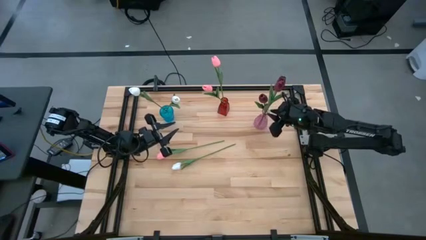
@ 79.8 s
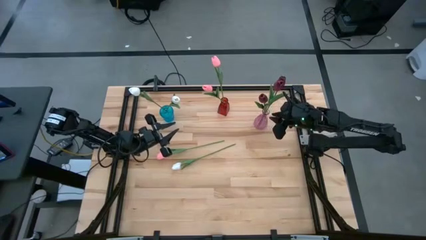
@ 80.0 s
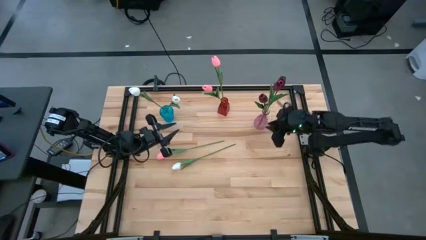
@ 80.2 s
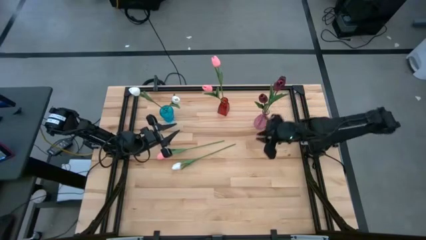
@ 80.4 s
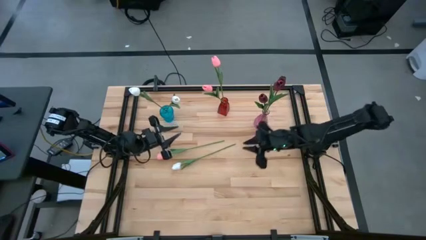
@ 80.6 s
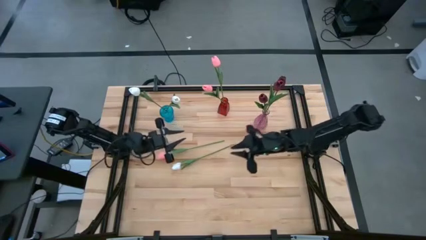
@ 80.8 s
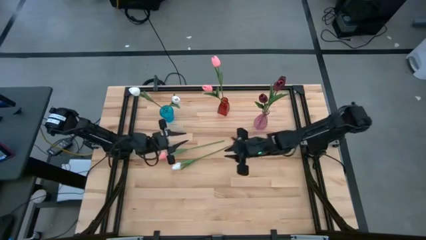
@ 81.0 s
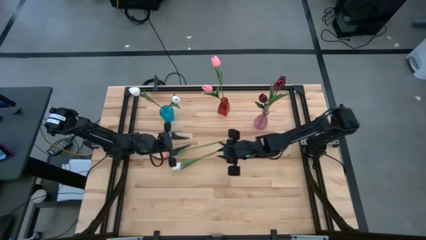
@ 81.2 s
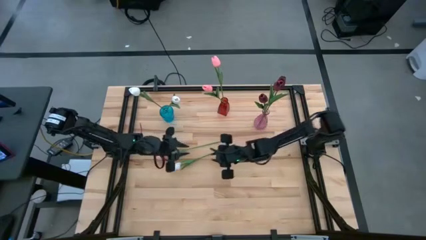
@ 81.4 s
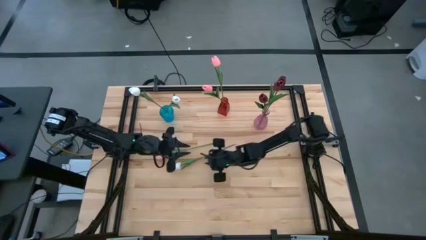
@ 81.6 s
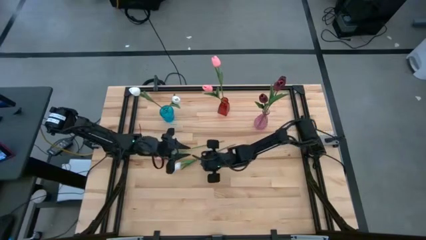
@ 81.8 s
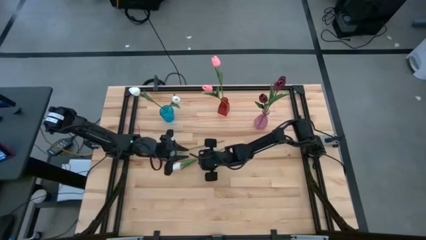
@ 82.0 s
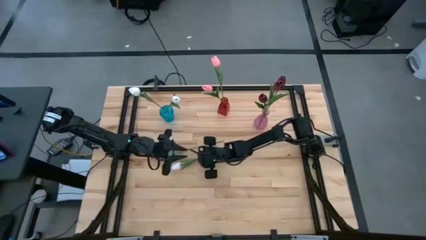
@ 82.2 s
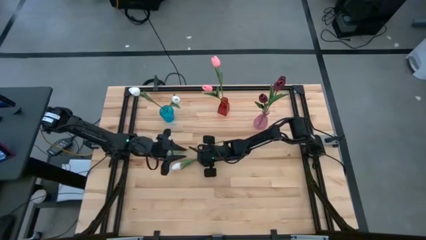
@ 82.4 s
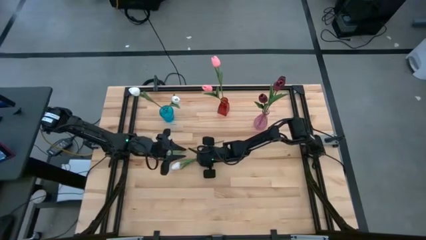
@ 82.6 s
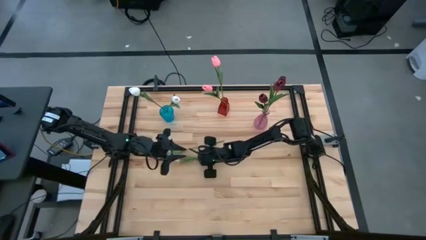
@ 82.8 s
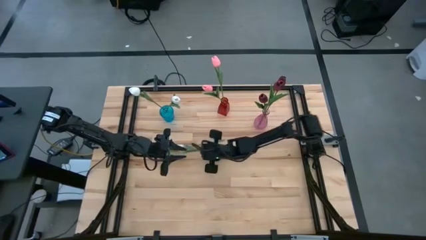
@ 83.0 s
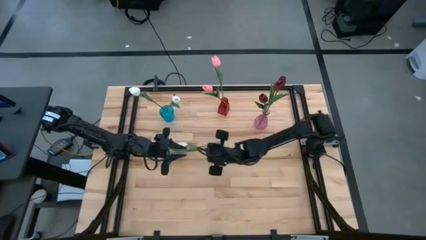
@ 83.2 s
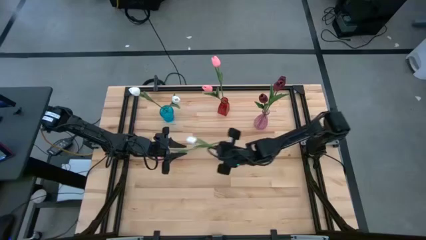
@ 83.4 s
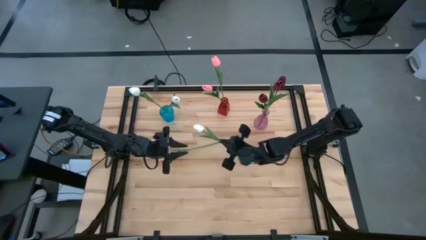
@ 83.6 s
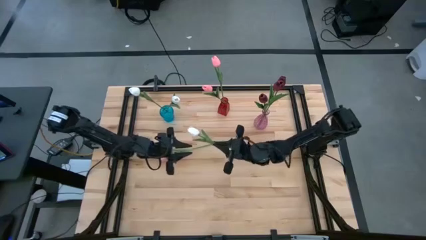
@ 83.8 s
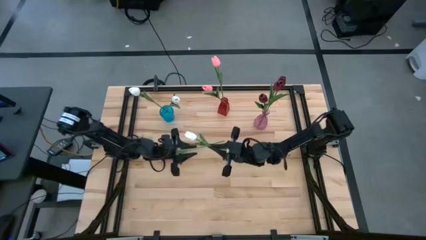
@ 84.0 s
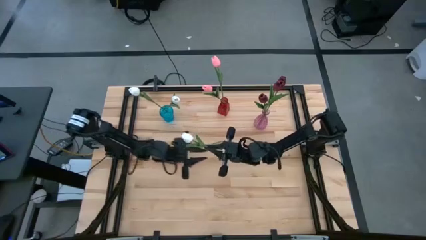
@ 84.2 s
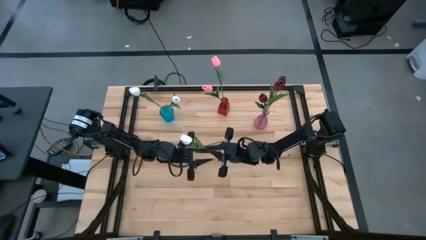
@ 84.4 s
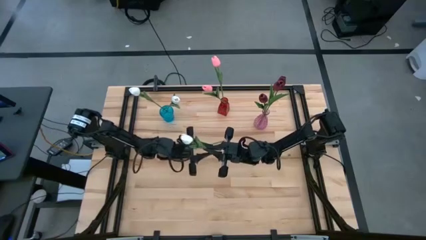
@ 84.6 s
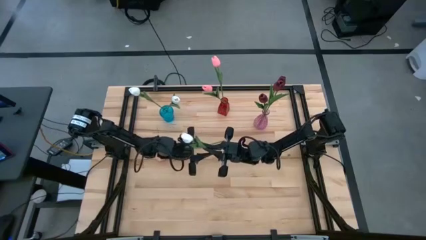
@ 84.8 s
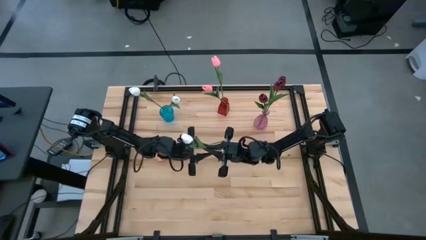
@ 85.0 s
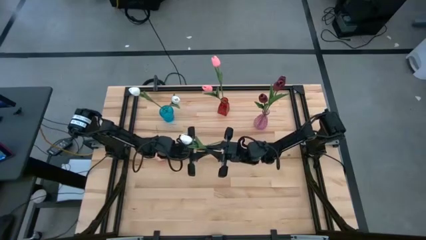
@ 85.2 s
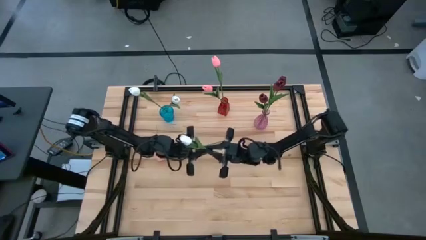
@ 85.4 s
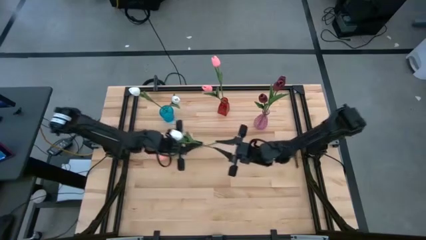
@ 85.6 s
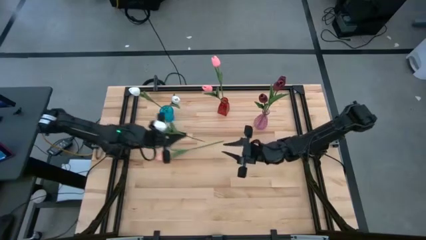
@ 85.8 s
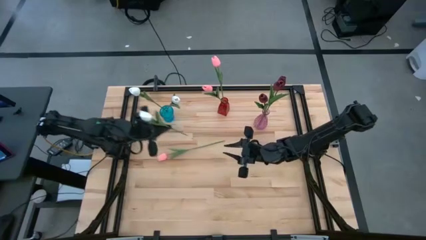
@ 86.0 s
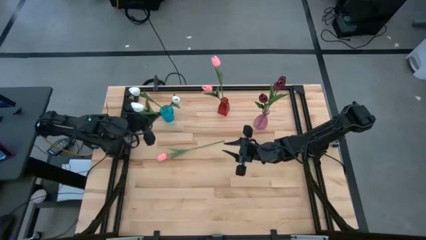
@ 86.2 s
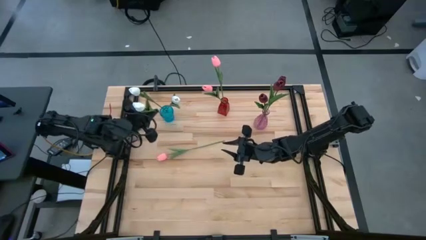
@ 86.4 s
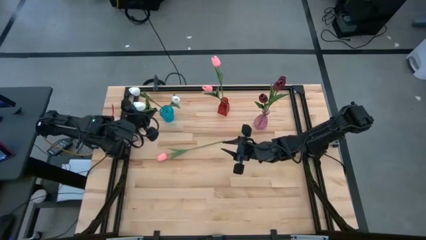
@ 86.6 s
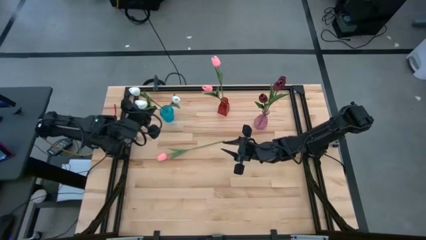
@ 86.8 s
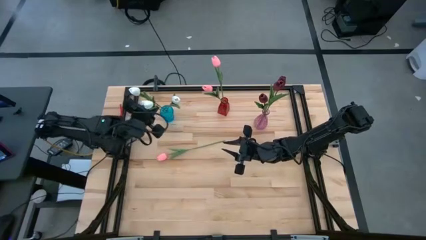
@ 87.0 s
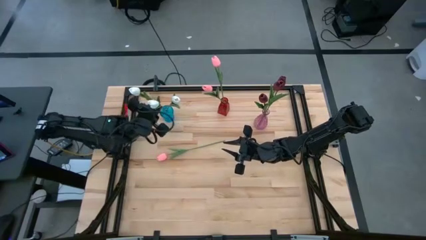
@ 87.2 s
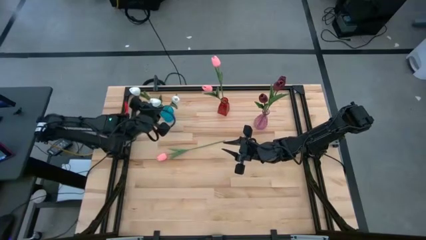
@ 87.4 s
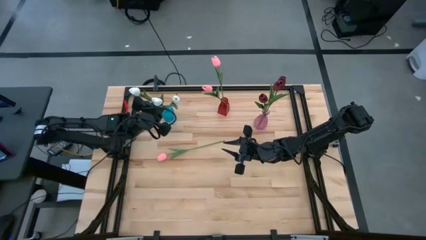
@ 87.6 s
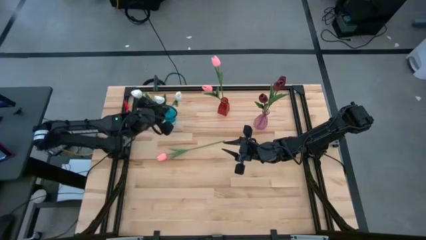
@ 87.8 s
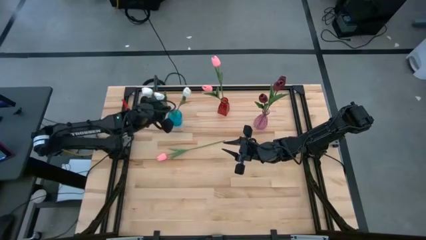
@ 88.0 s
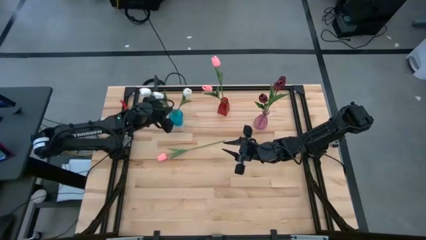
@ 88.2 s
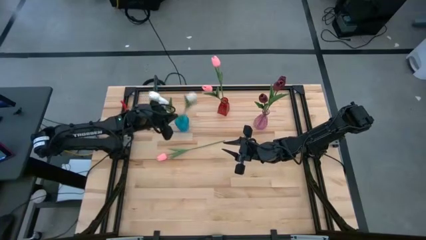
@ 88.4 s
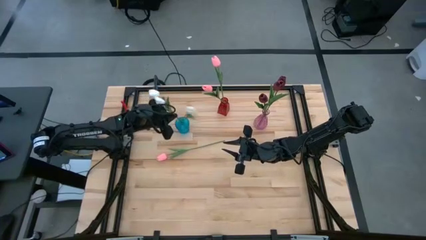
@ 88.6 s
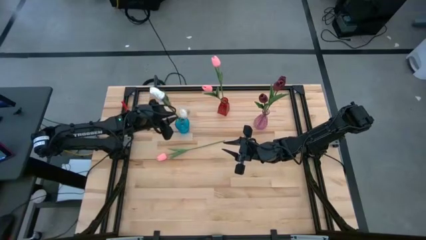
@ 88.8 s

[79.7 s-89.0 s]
Task: Sort flowers into vase by color
Put the white flower into the blue vase

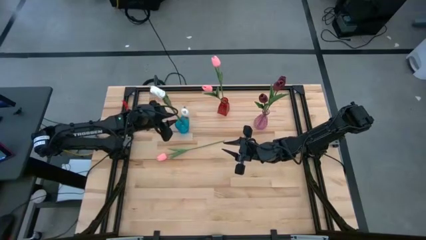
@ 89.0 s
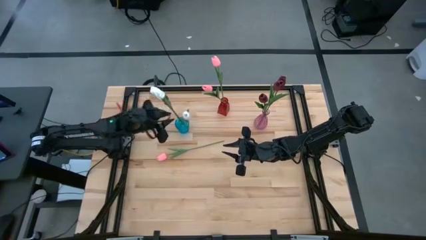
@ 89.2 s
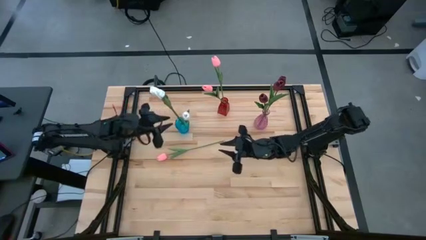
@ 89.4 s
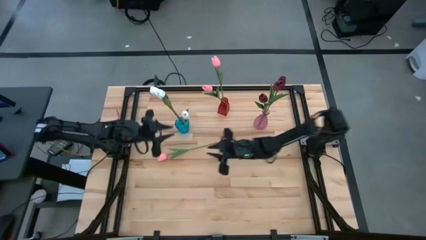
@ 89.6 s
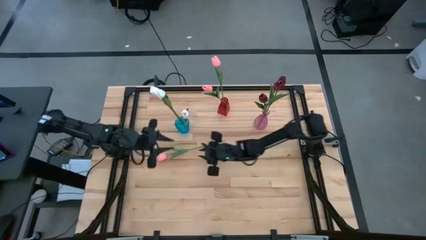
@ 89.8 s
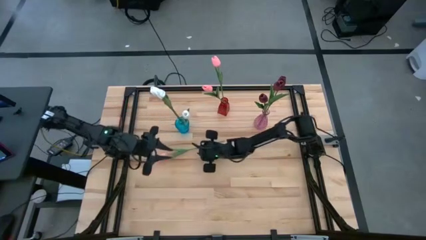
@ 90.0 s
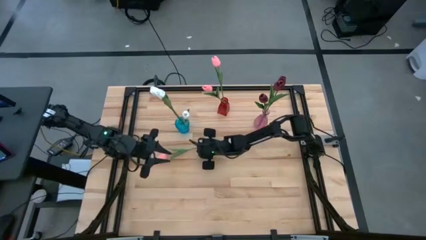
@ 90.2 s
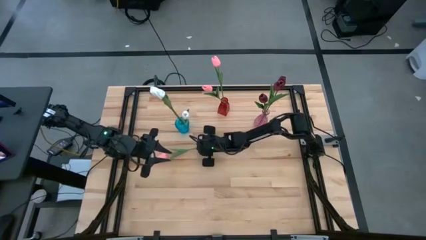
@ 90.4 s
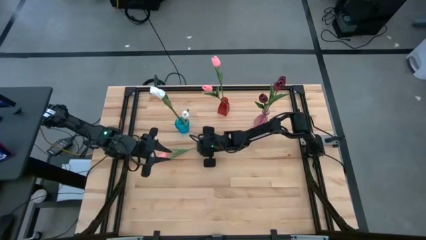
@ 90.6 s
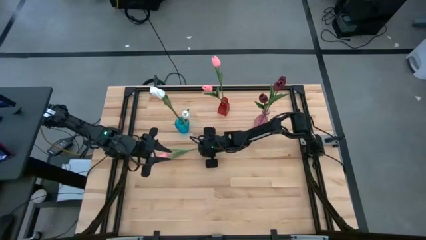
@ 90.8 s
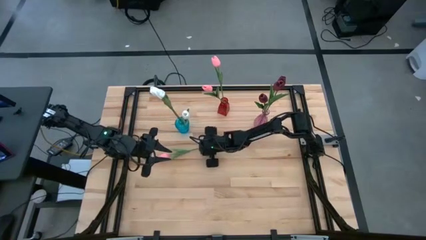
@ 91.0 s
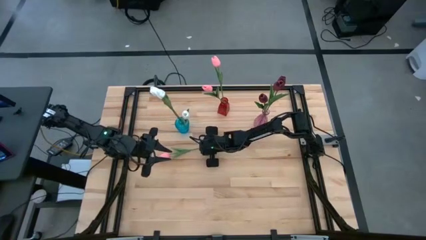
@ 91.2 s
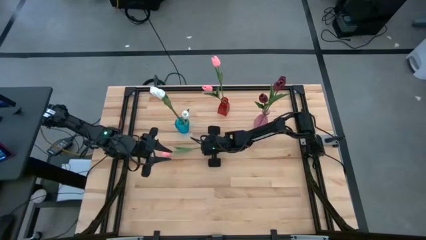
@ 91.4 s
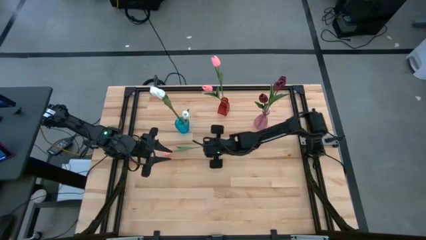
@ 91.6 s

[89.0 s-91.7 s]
Put the pink flower into the red vase
